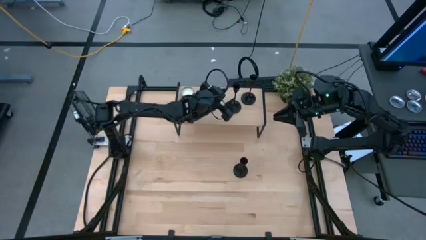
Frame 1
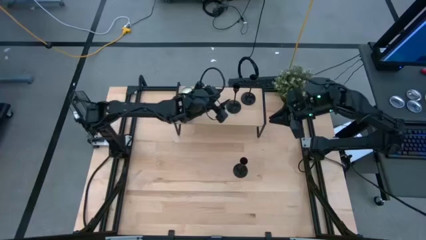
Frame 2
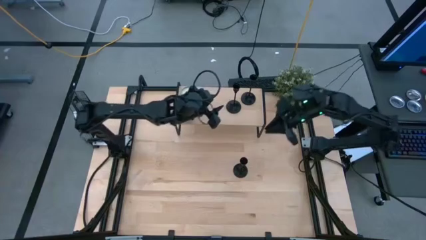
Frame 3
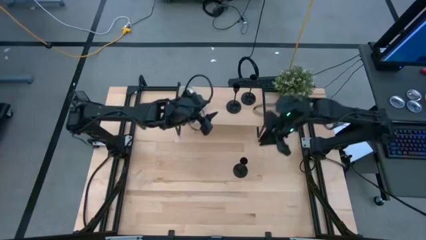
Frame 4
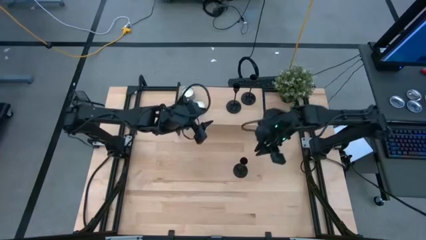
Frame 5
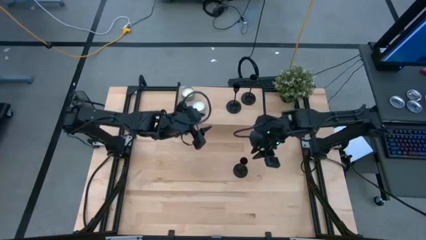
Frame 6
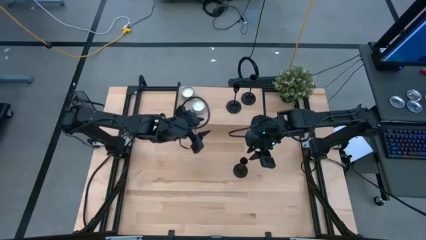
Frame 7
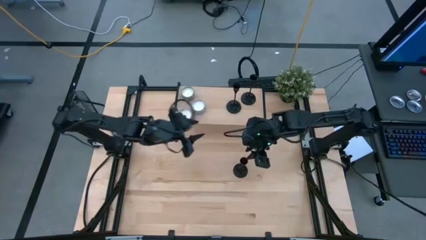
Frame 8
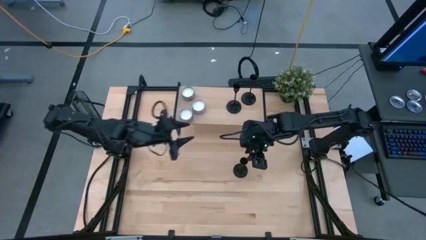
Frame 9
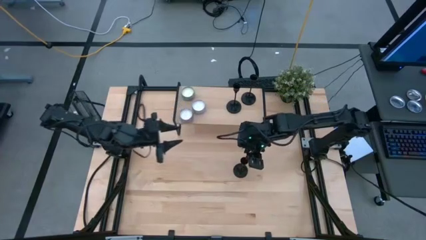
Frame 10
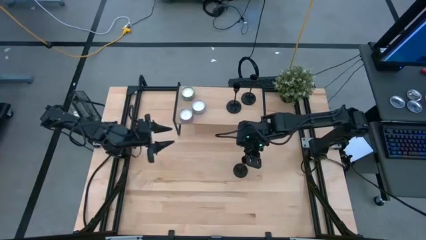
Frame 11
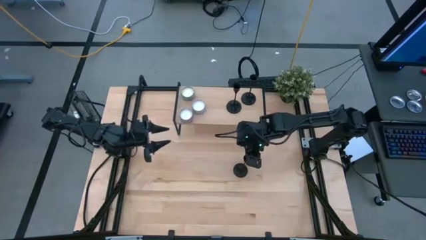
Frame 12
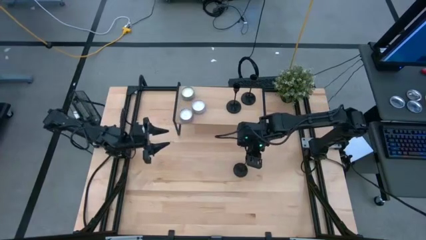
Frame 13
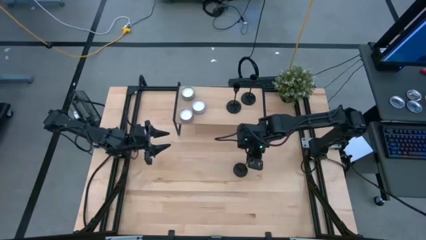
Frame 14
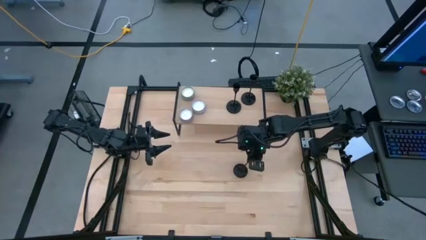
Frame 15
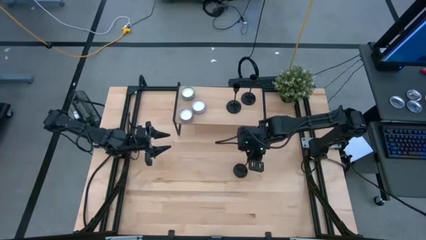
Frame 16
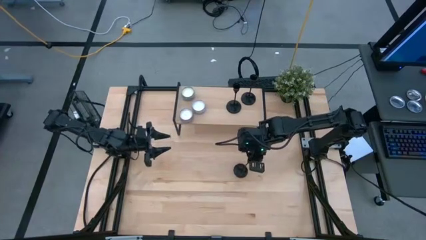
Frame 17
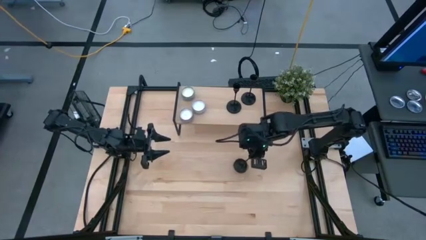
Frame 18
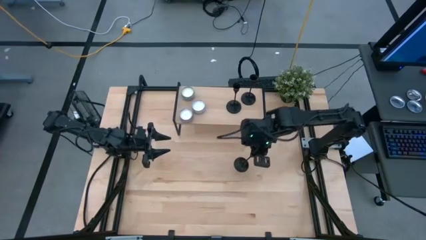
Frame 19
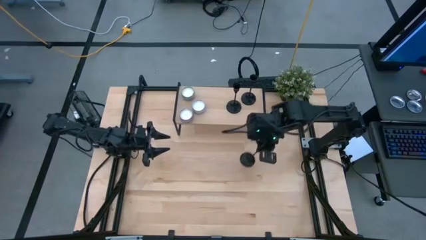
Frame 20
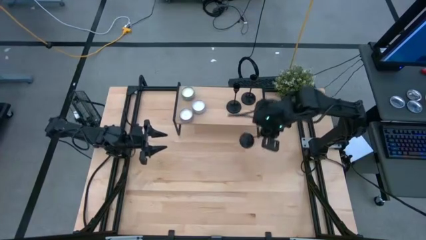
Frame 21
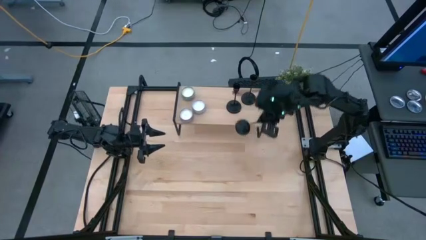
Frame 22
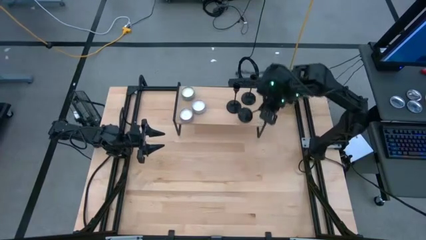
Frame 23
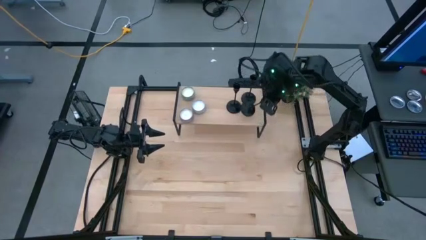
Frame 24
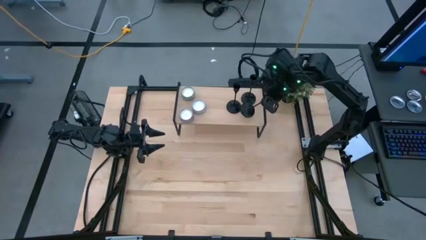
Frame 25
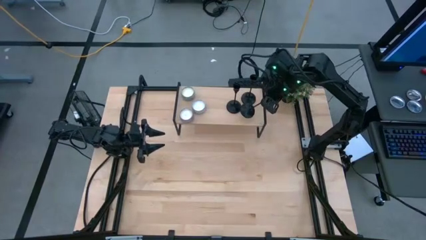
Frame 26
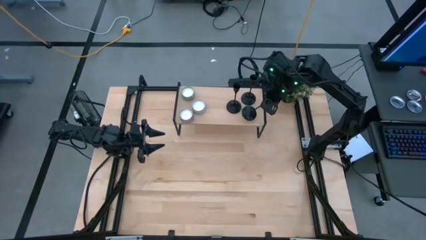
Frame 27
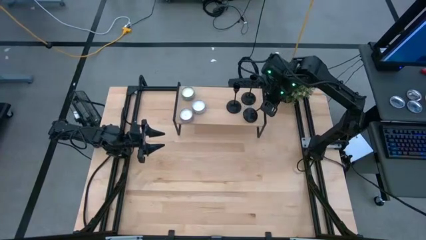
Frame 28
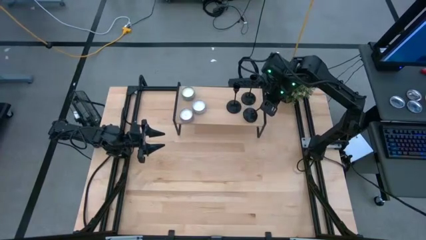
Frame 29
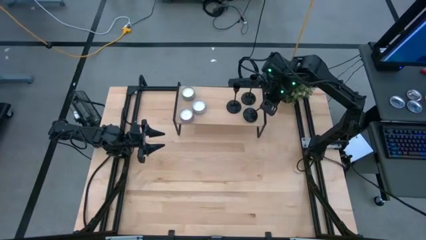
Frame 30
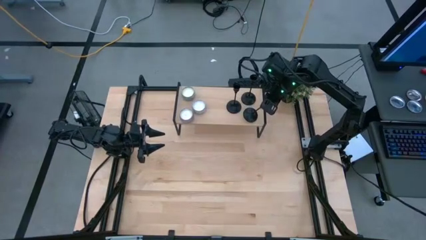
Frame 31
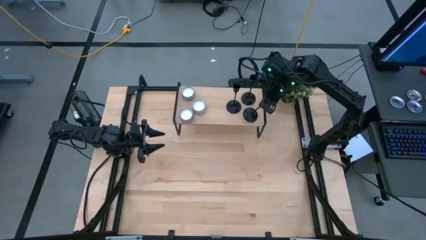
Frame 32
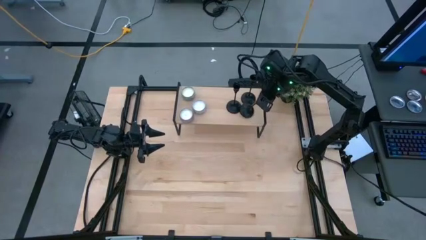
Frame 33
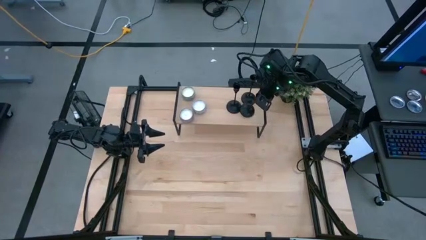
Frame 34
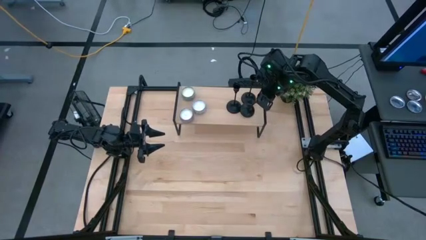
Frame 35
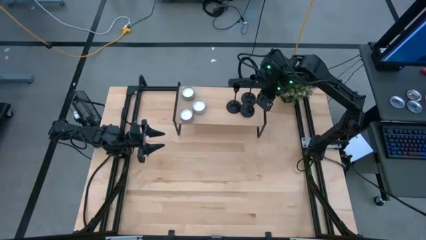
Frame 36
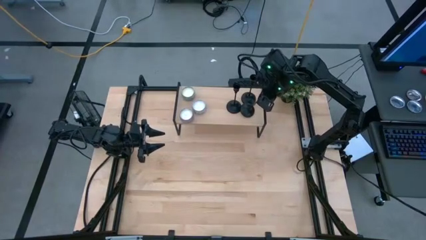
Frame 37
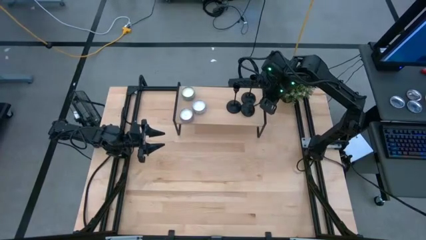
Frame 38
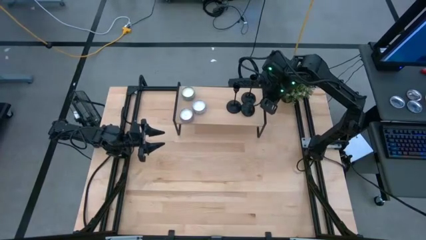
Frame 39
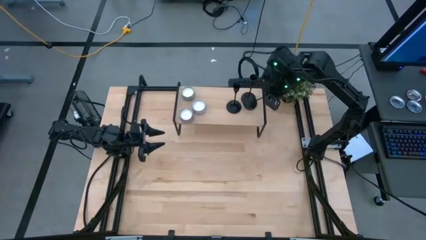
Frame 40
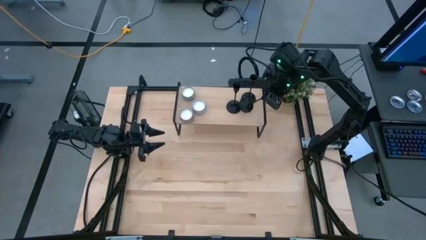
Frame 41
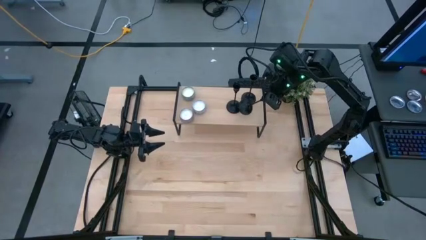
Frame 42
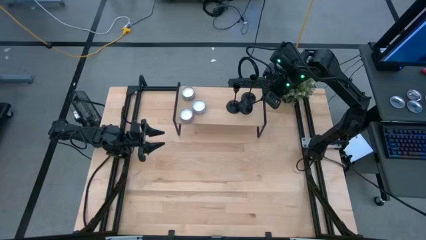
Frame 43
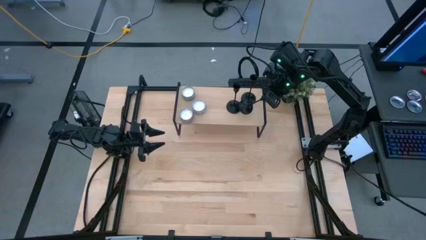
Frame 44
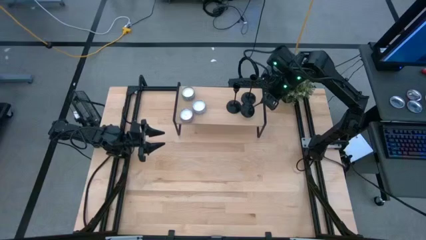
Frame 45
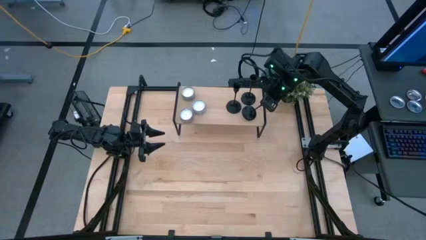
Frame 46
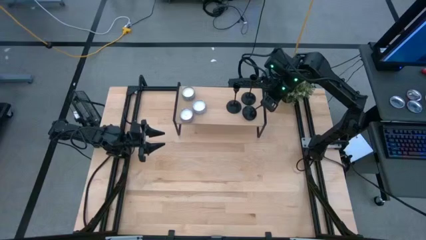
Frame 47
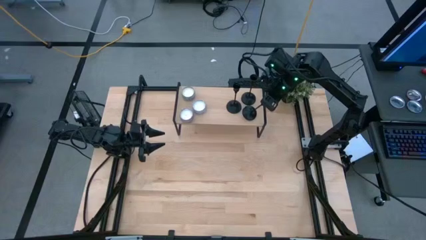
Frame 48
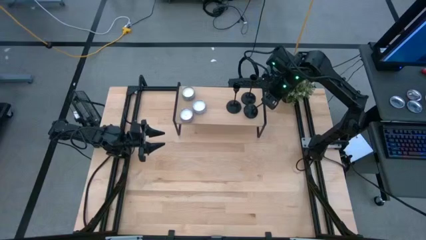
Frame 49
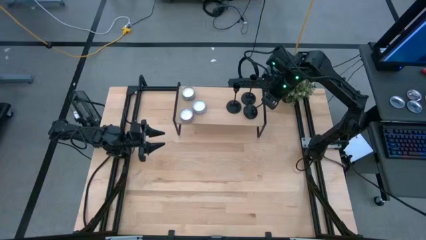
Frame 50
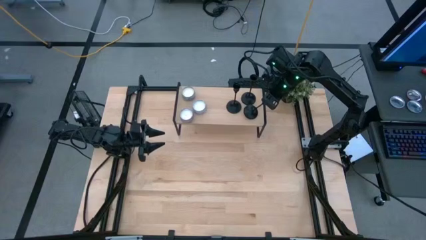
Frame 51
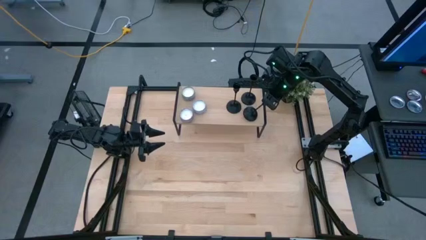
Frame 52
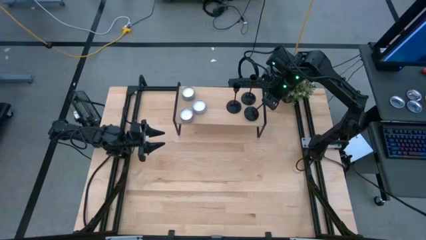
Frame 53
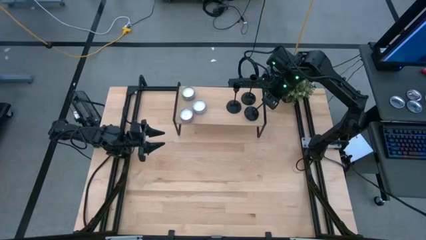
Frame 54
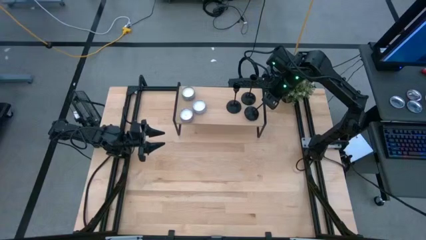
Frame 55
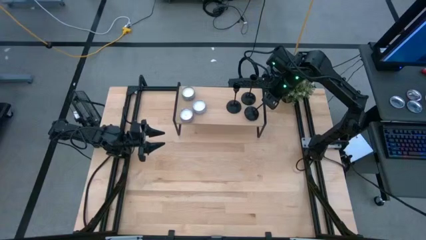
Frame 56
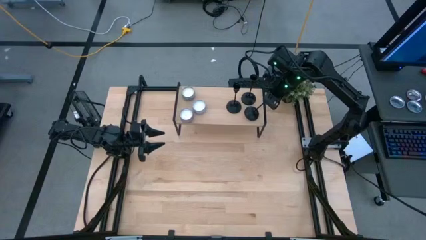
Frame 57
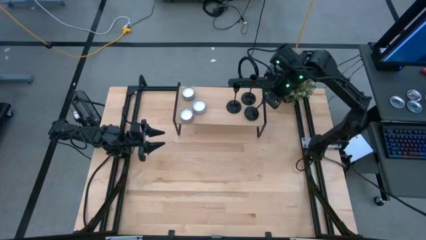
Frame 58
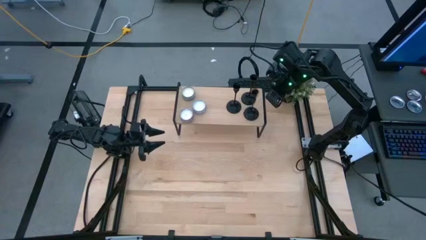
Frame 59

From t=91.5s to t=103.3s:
Task: Pick & Place candle stick holders
Put the candle holder on the shelf

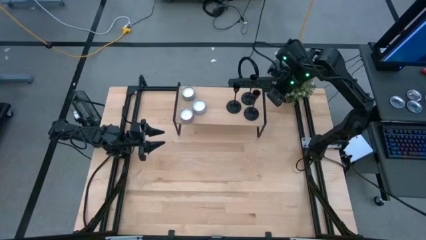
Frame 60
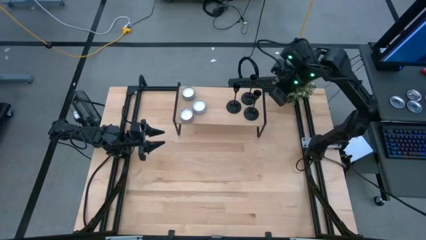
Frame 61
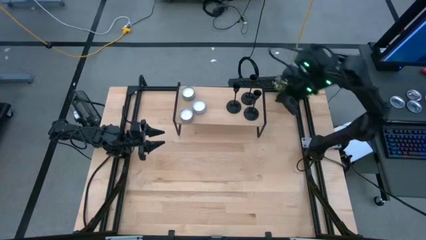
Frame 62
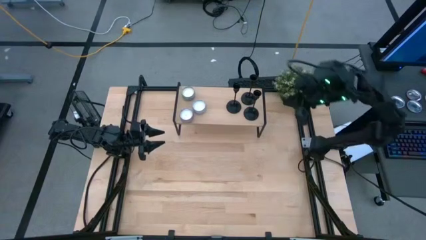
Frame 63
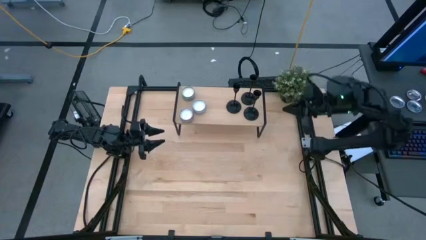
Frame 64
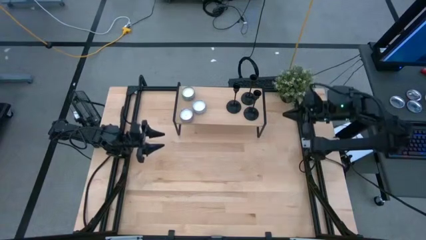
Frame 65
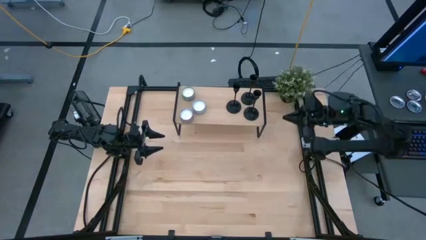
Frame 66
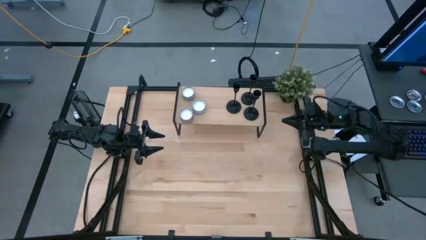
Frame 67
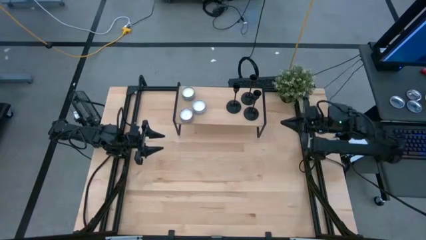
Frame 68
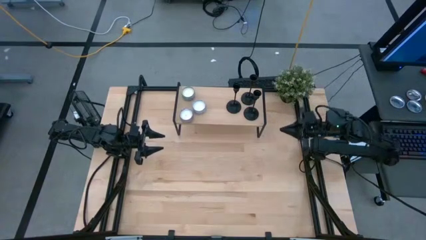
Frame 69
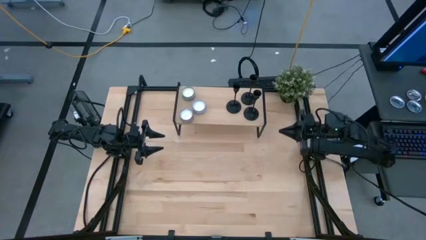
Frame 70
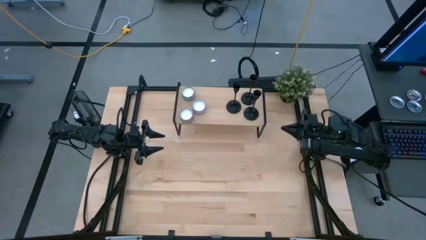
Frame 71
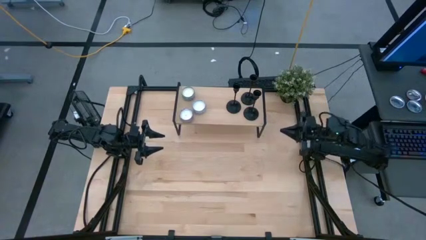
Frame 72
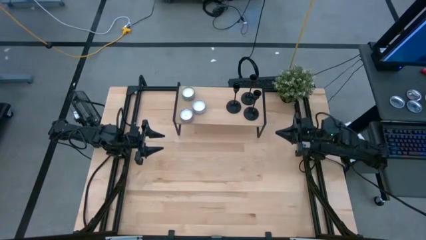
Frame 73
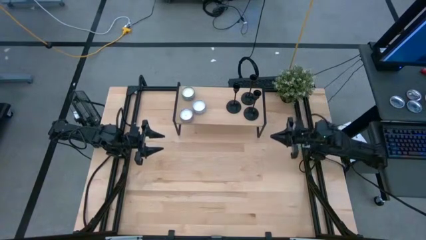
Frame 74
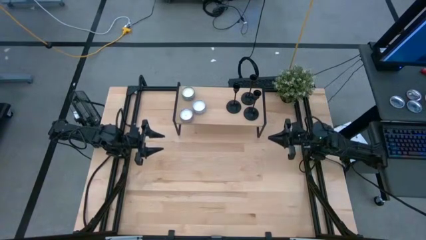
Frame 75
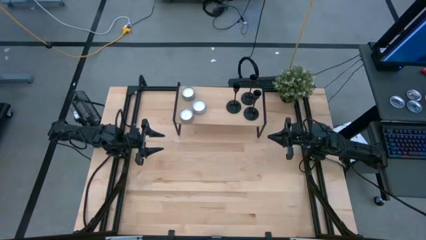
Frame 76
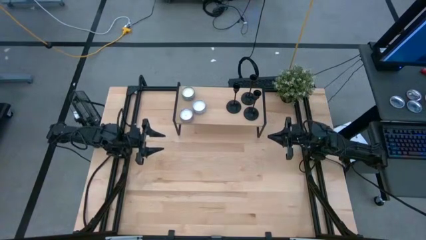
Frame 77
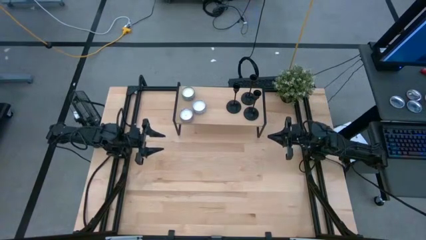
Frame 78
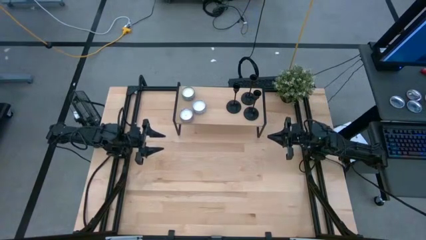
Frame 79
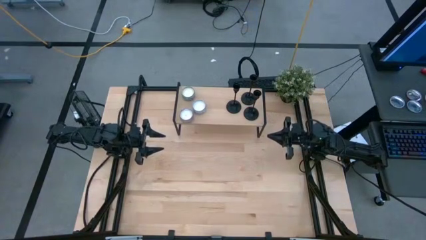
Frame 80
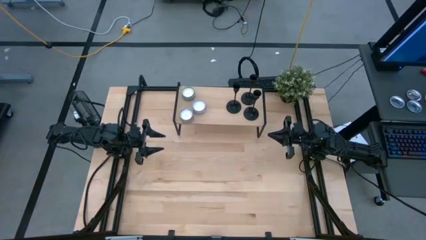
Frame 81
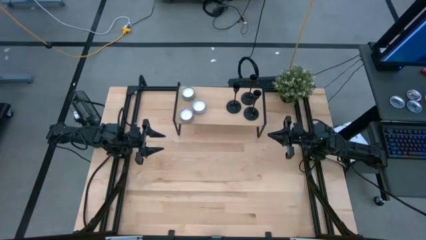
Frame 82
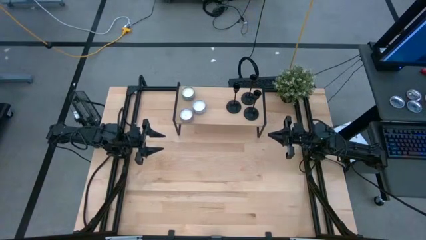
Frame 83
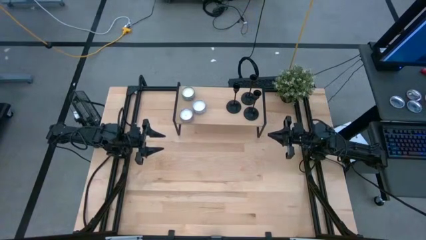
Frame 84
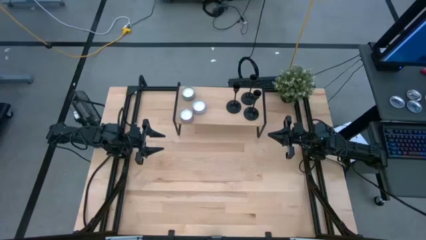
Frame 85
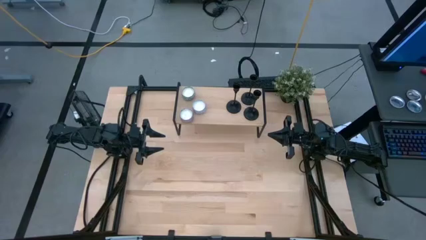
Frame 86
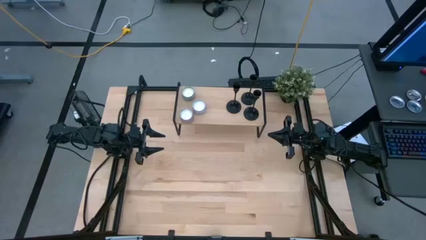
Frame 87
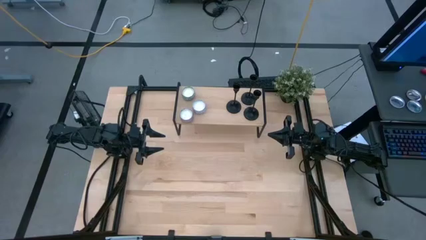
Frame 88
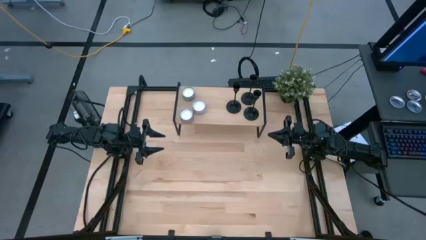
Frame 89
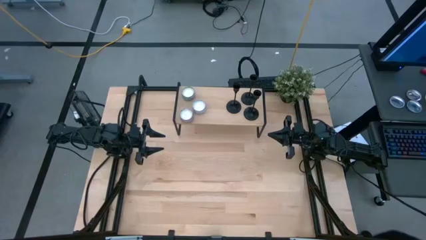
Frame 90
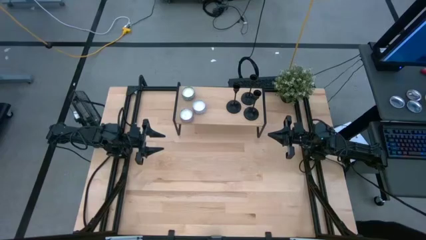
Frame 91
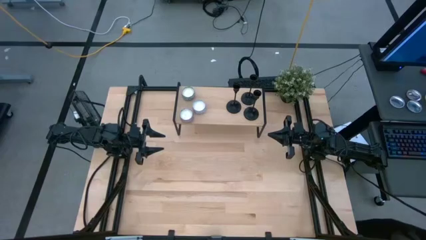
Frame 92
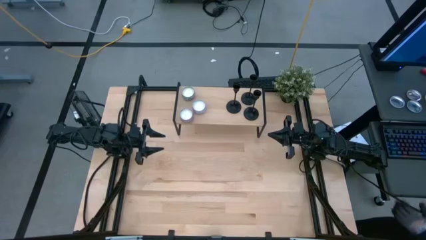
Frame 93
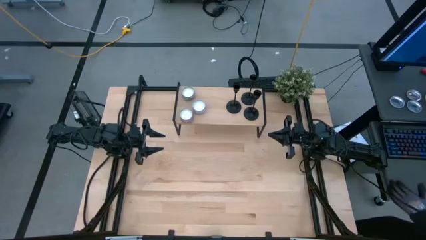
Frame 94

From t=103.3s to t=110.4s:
Return to Home Position
